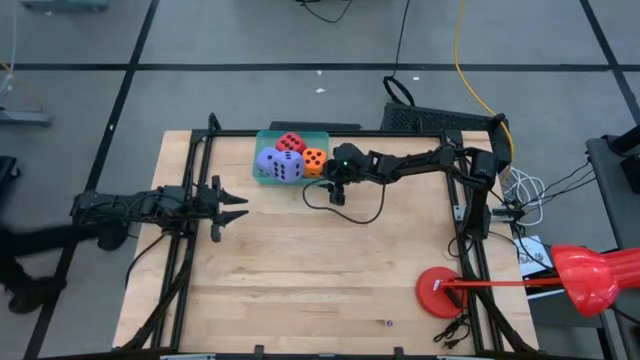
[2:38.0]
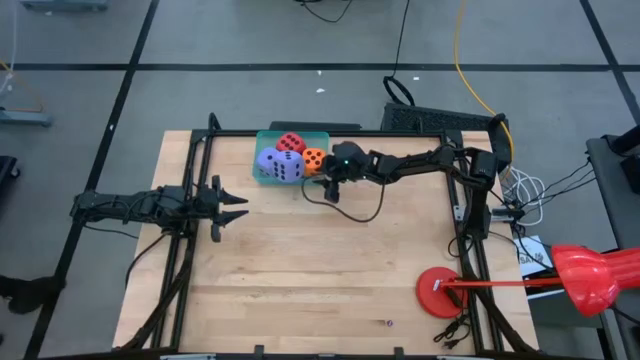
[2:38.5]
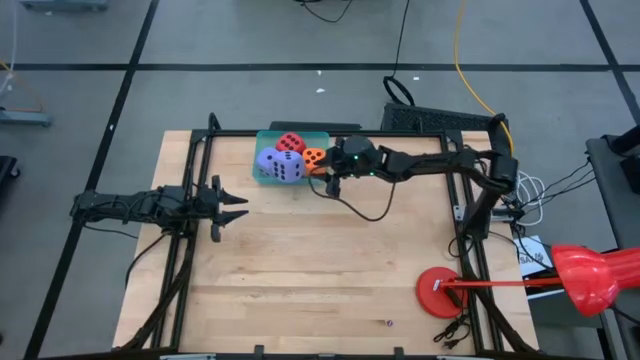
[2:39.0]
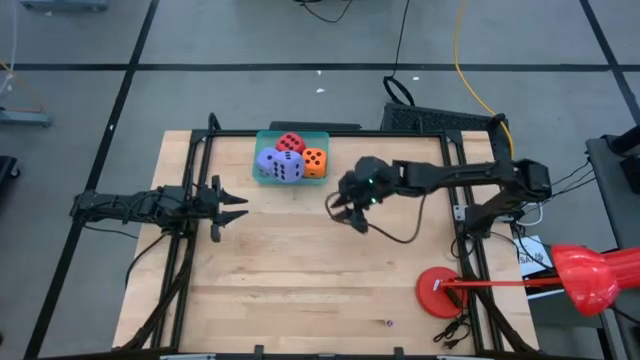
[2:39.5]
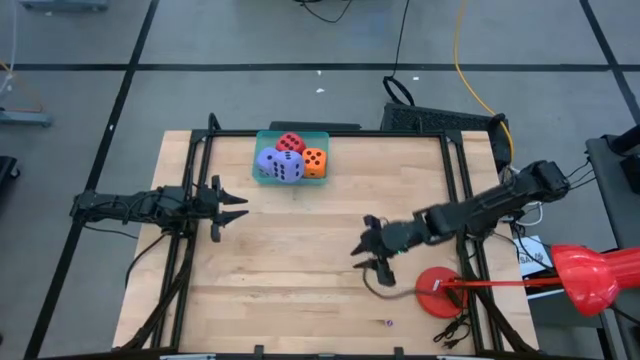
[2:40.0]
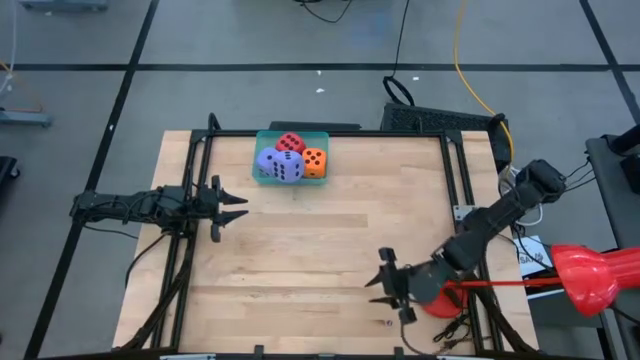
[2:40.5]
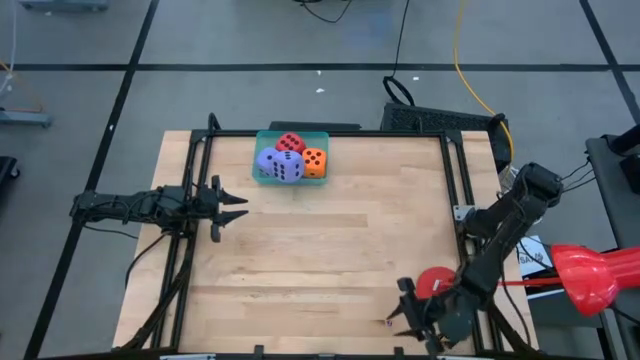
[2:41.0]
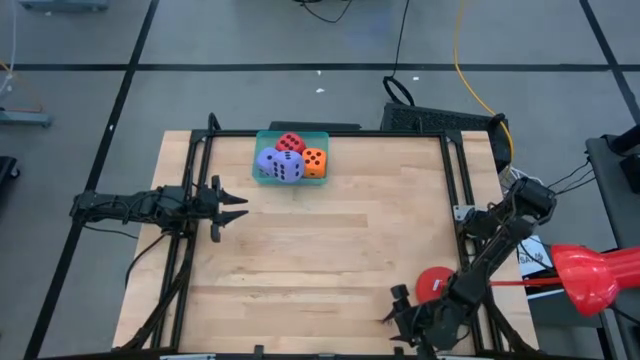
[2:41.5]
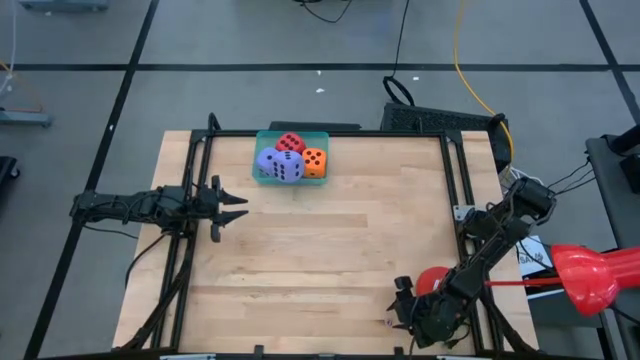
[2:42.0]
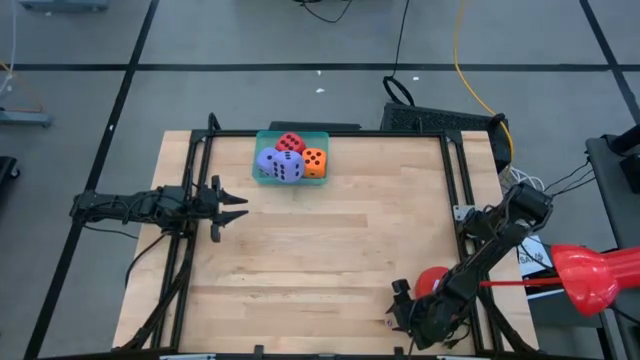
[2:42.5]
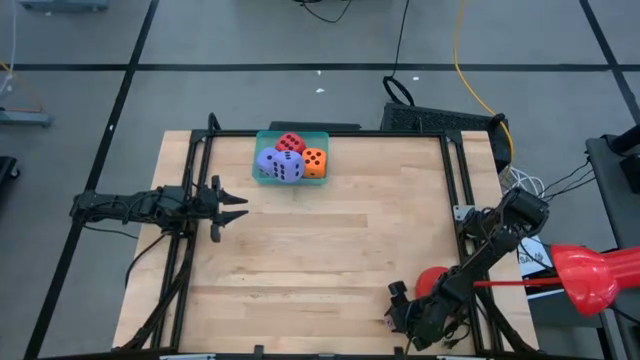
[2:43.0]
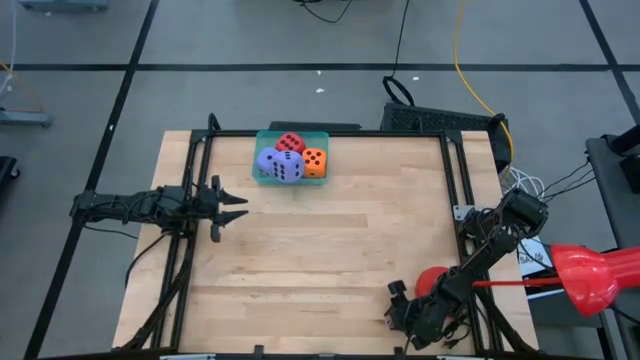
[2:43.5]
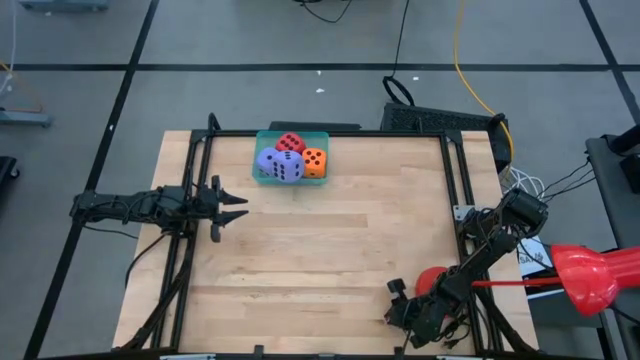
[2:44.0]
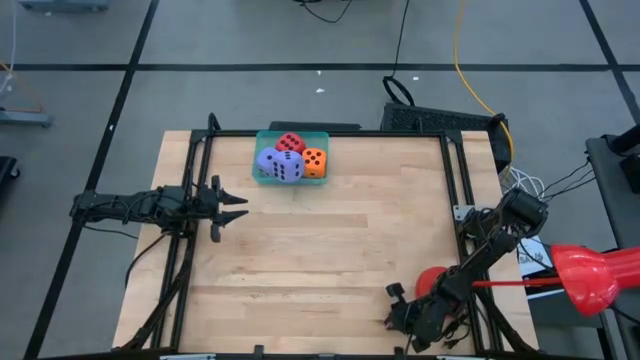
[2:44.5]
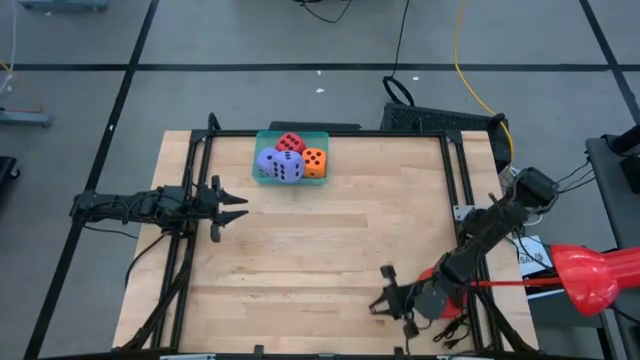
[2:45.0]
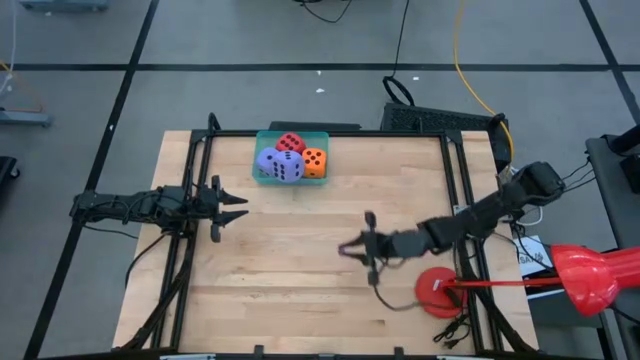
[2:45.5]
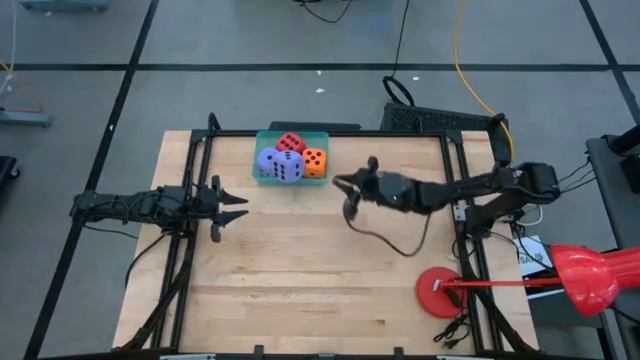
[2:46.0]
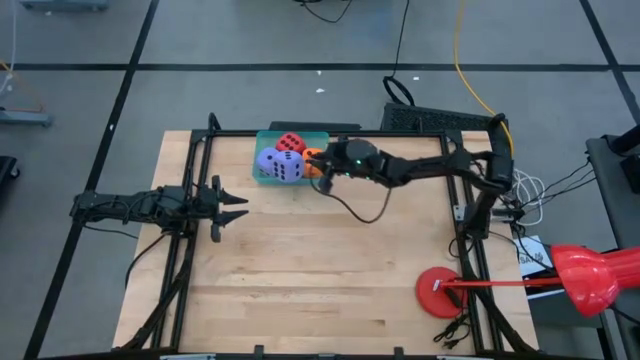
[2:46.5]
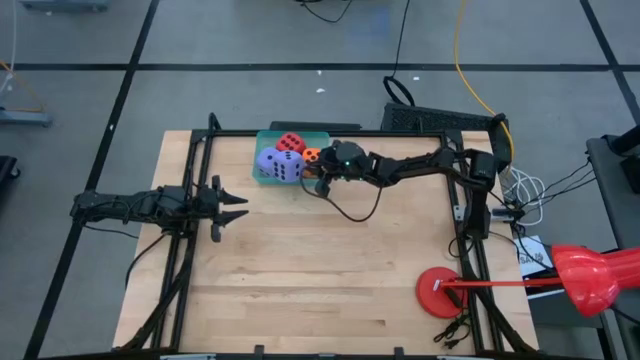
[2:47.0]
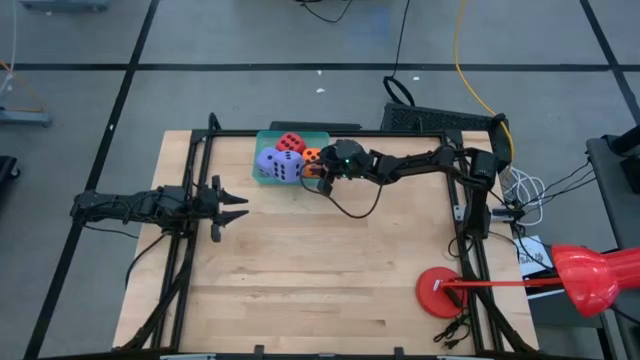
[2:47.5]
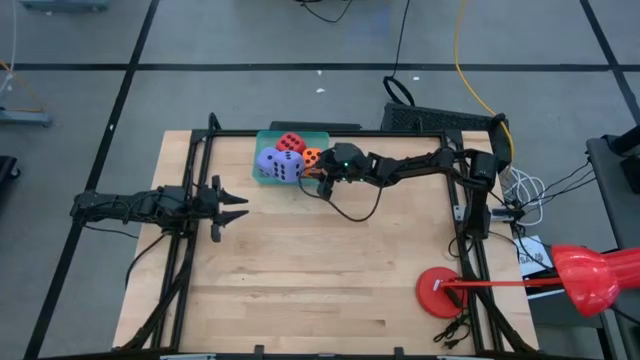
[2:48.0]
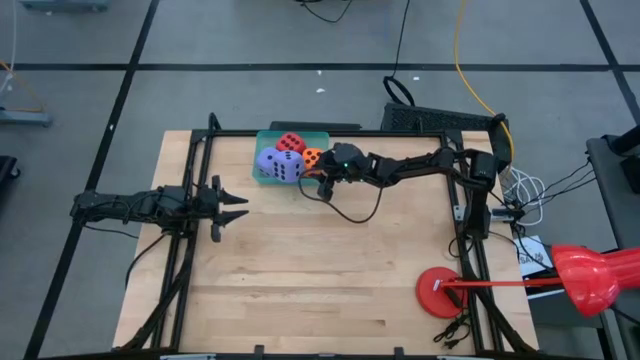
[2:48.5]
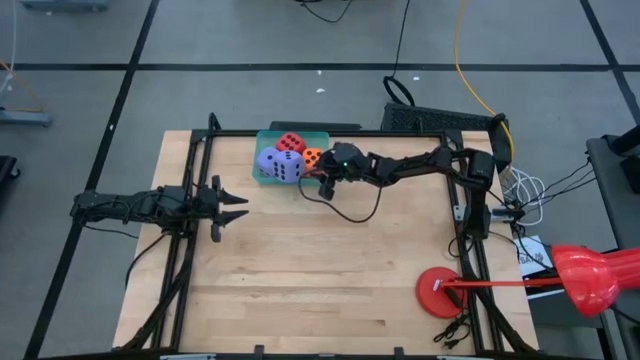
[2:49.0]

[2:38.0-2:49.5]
Task: Pick & Place Dice
Put the small purple dice into the green bin

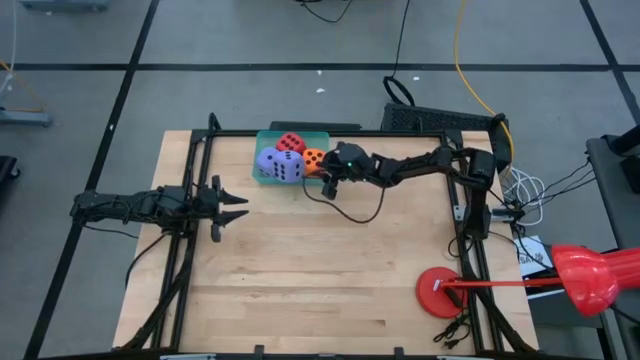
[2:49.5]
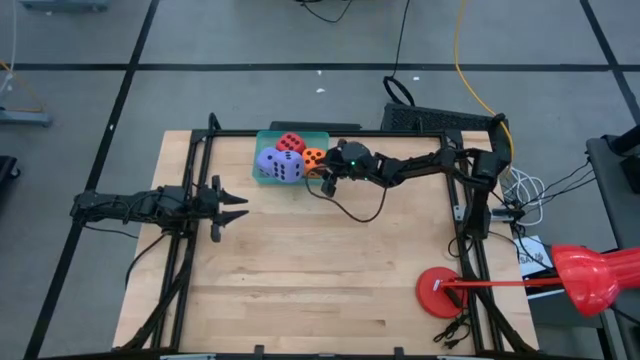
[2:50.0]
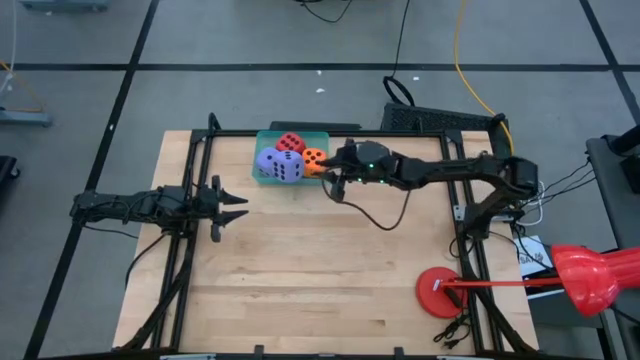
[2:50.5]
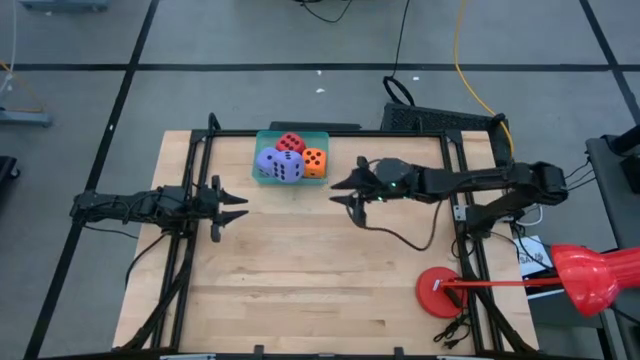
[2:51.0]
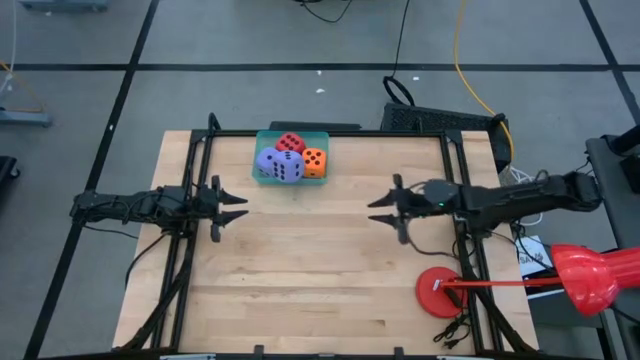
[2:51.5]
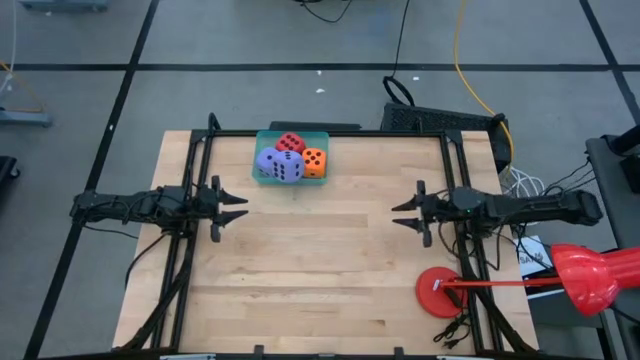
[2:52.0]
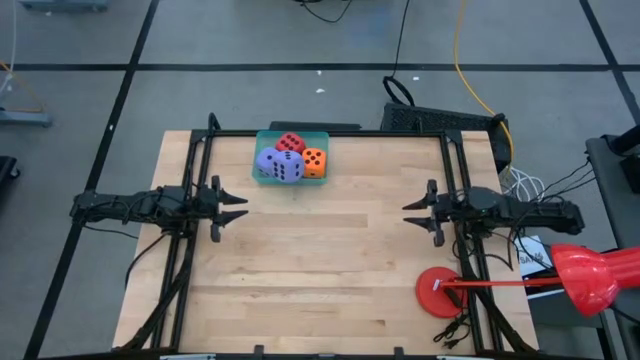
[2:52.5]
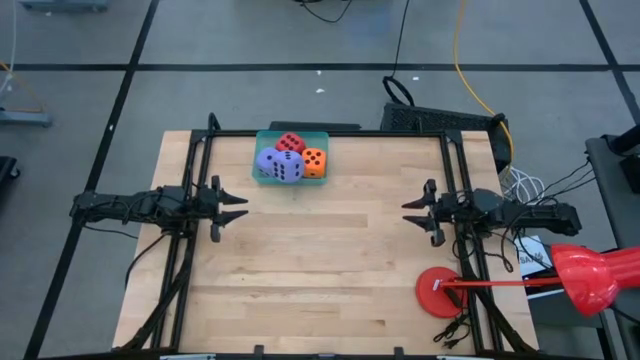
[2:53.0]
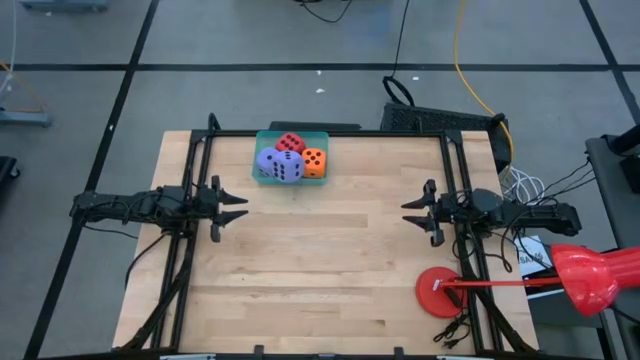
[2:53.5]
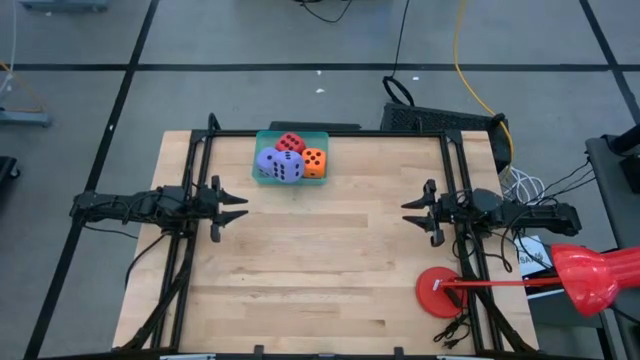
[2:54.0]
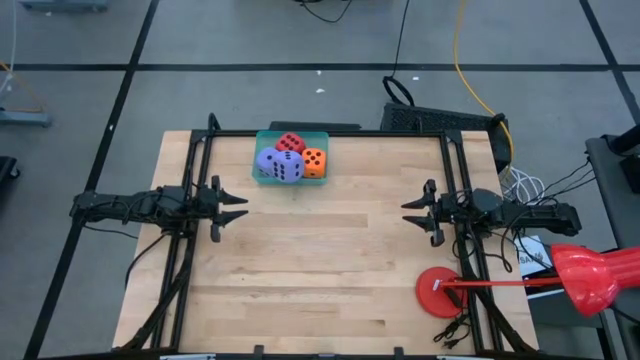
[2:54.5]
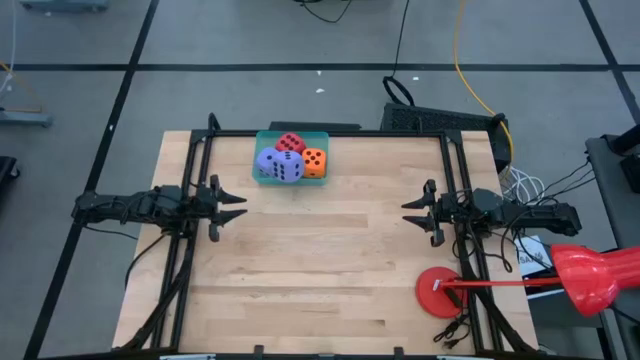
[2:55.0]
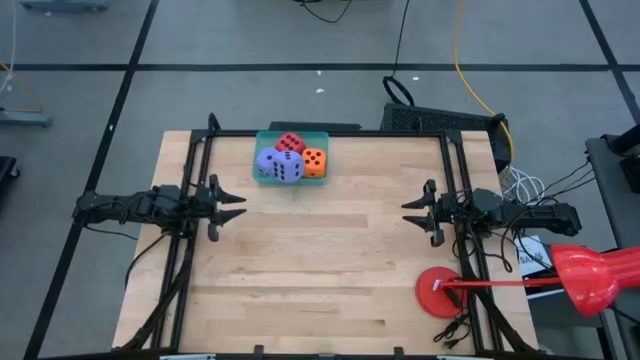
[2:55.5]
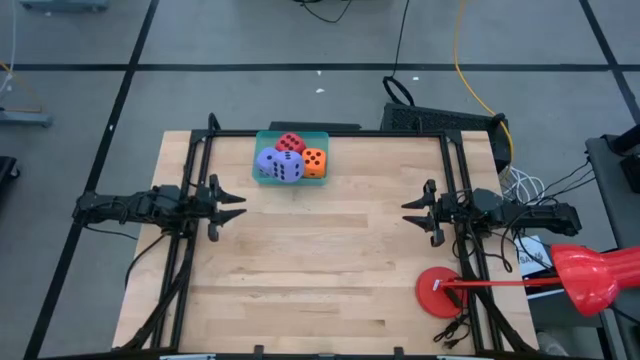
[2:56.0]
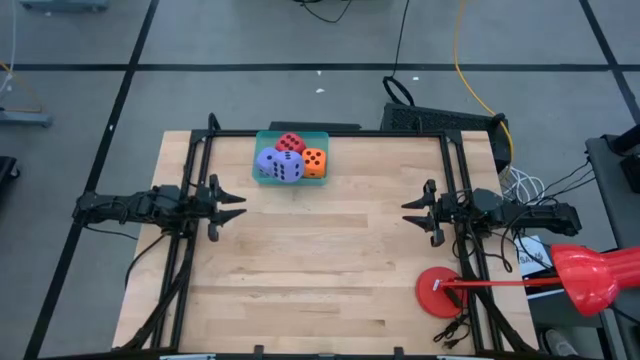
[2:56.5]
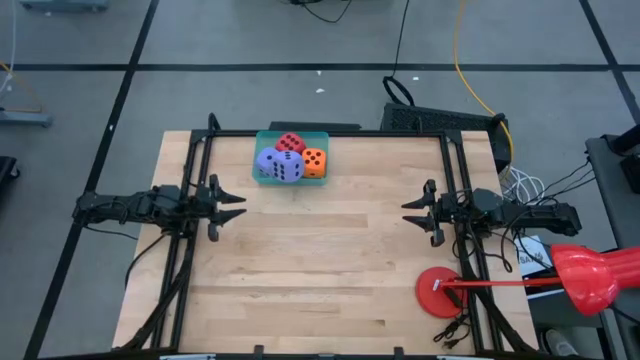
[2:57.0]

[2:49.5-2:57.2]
Return to Home Position

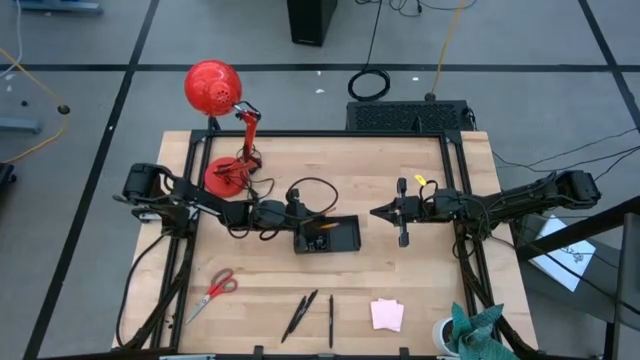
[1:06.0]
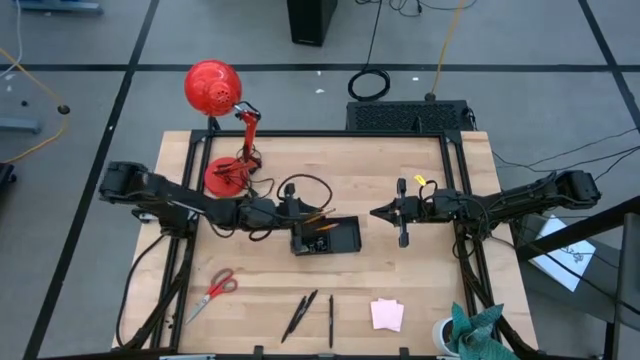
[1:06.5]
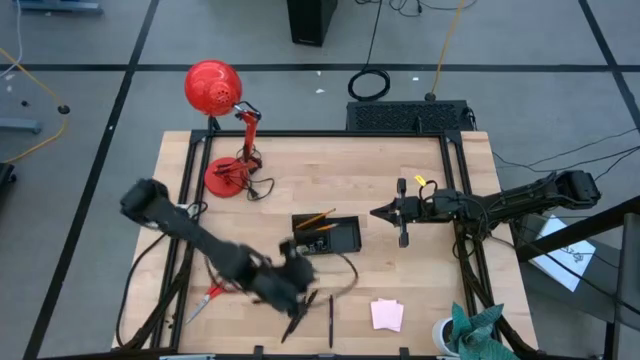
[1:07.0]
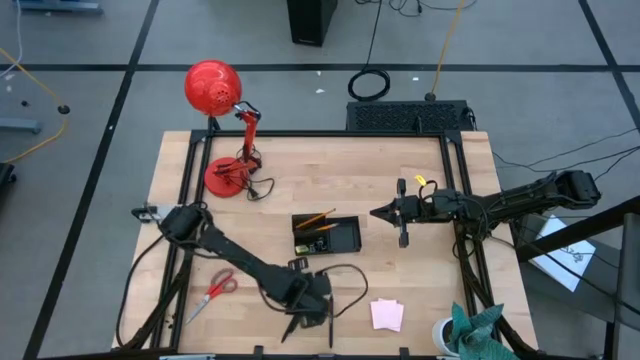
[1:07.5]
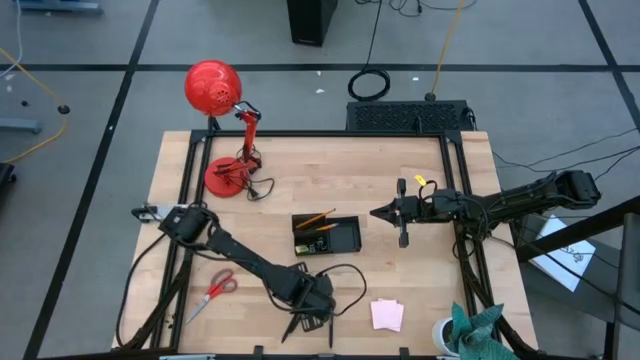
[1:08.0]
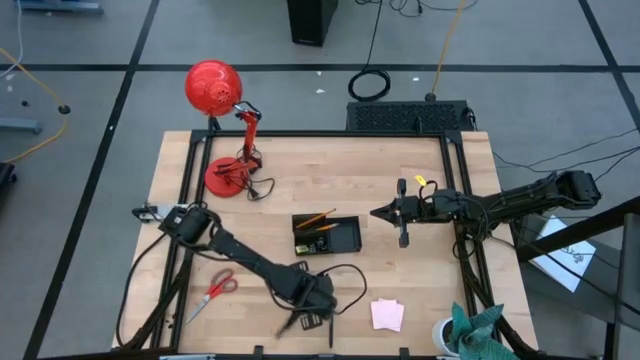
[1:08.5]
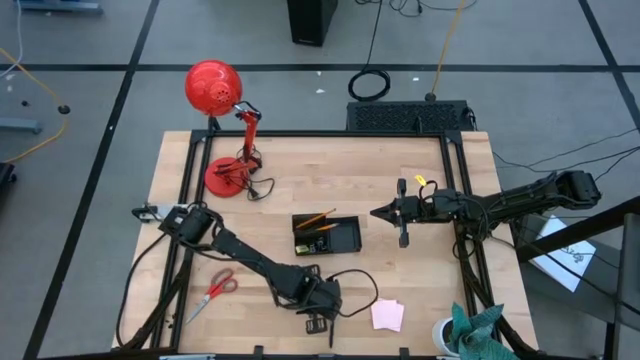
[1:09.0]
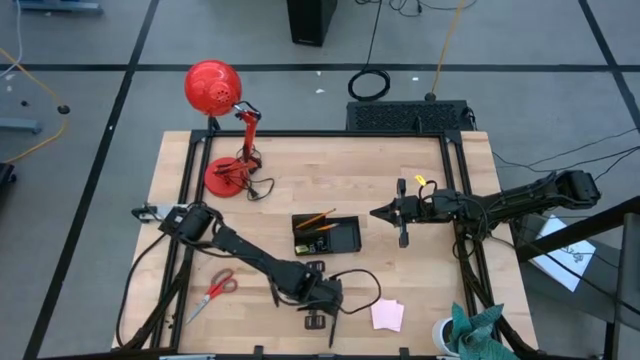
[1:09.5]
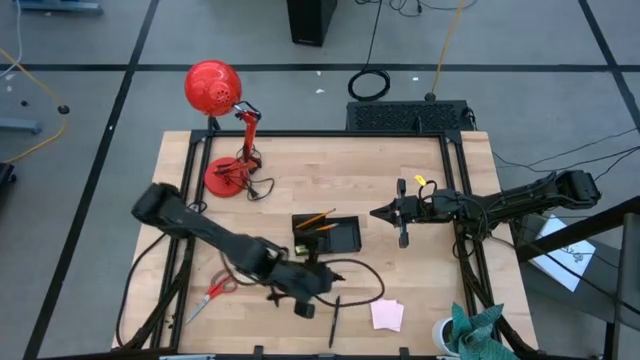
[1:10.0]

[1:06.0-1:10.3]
Task: Pick and place office supplies into organizer
Put the middle pen into the desk organizer
